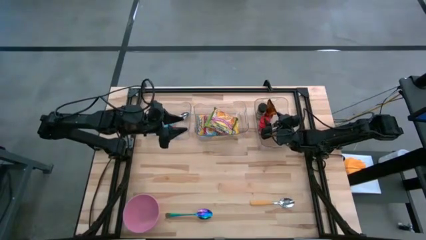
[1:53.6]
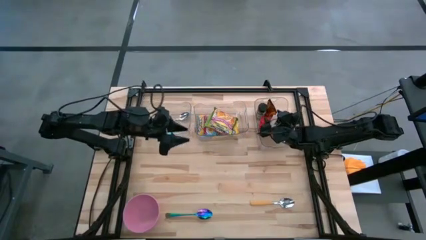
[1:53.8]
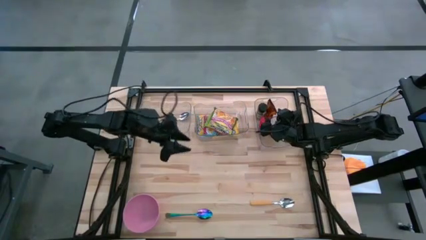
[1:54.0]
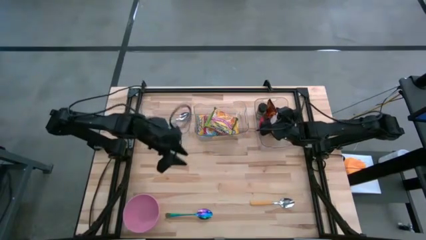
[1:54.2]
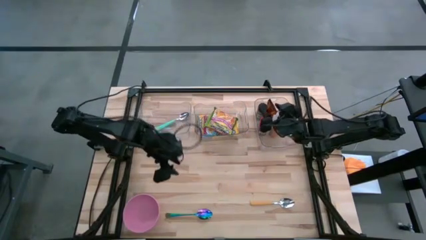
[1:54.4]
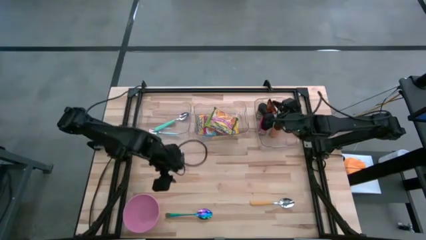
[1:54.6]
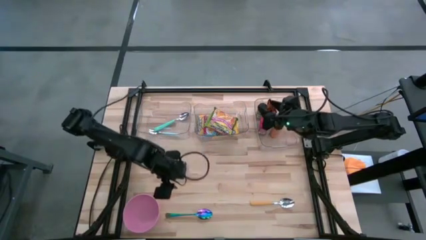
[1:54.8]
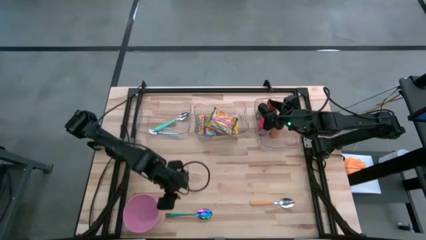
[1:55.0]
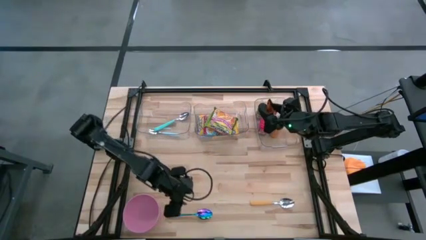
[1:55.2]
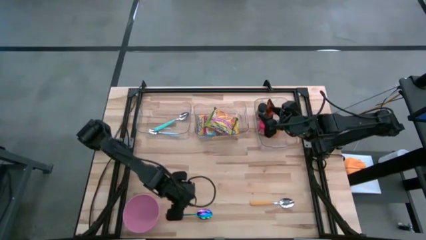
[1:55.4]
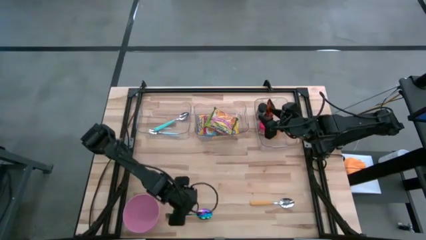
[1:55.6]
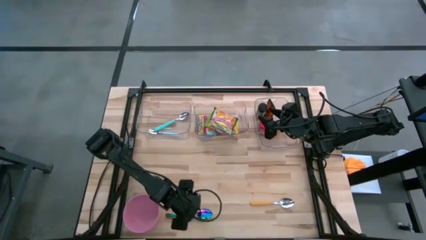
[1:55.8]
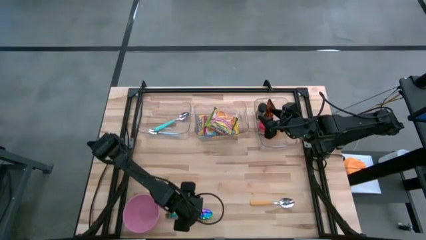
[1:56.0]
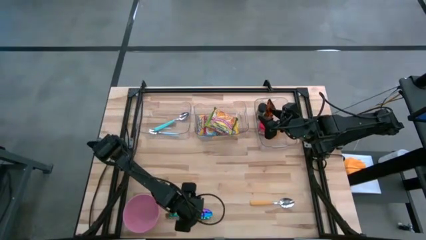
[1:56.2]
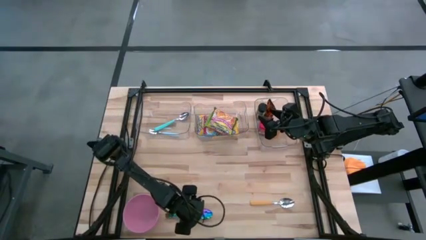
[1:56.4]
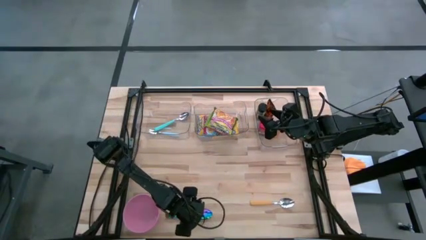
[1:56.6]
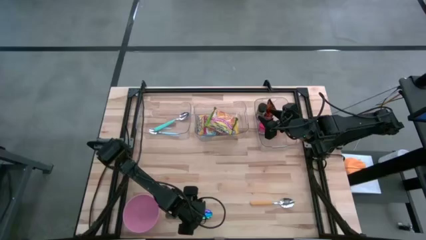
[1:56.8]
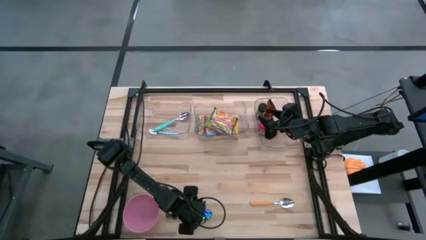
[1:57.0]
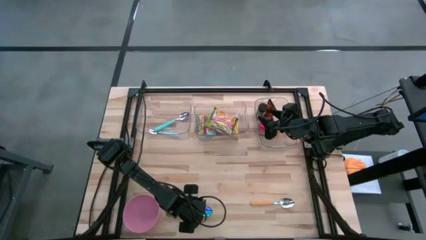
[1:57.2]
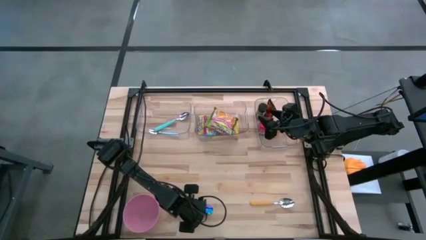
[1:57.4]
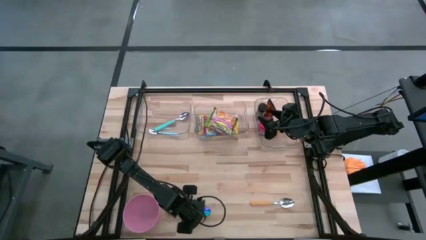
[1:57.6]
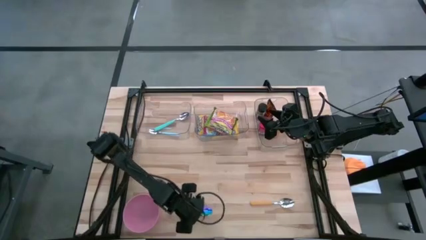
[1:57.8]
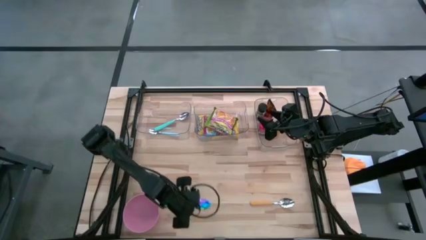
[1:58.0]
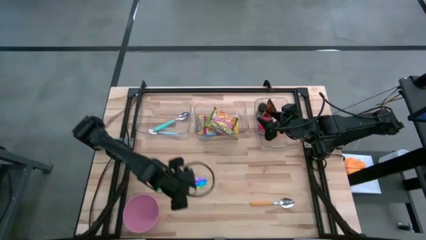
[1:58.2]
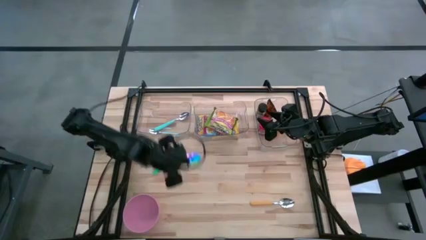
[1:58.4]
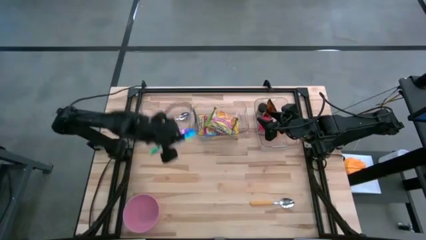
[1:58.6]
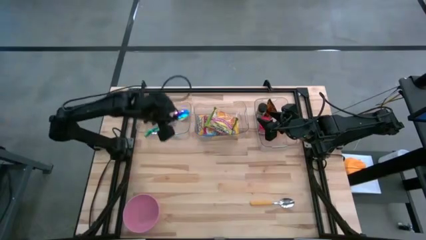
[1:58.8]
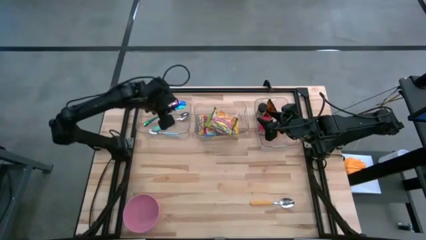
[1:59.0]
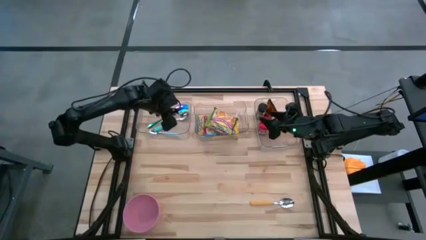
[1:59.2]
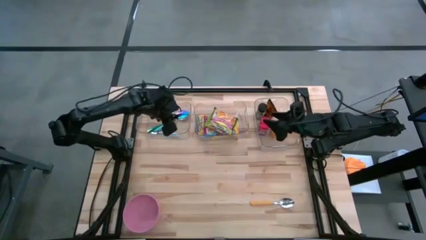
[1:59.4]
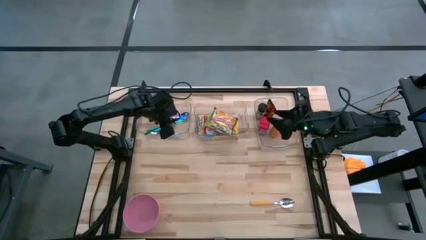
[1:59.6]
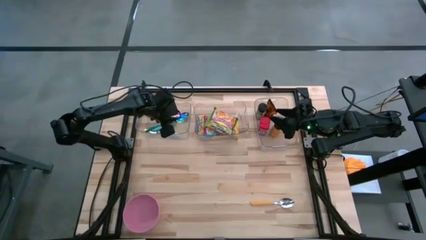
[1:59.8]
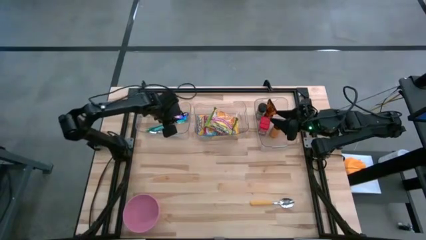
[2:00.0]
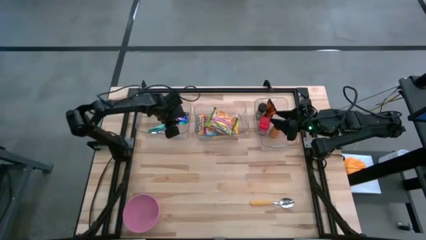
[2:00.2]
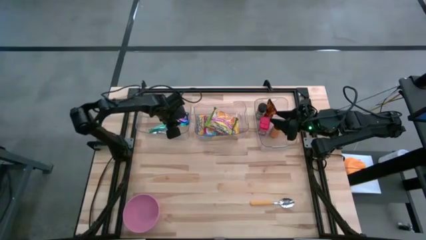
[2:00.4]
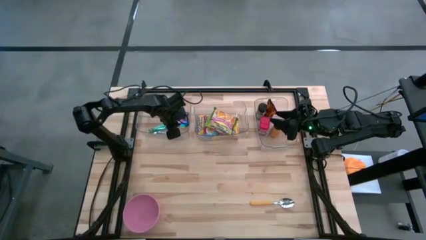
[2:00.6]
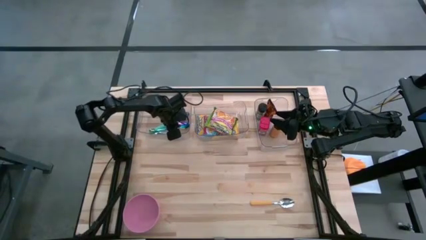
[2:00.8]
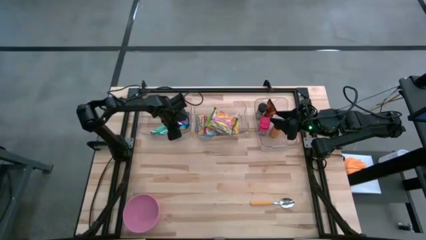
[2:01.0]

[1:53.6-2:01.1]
Put the blue green spoon into the left transparent bin
